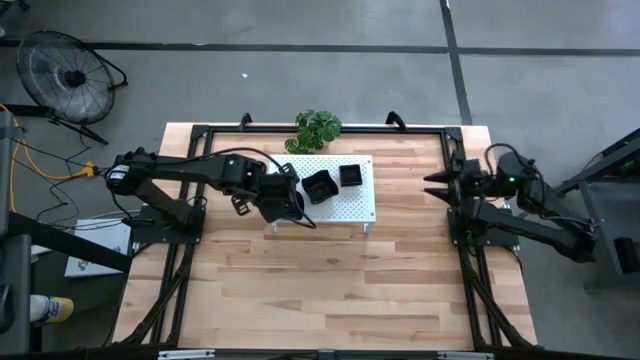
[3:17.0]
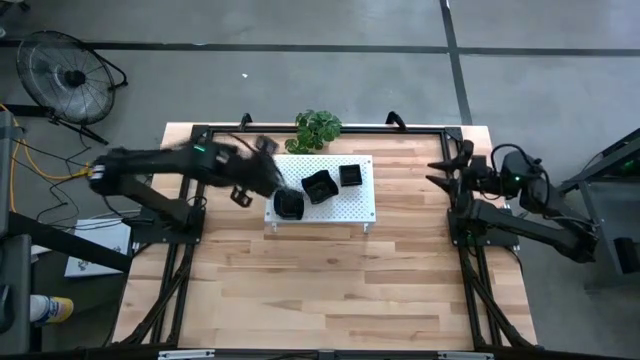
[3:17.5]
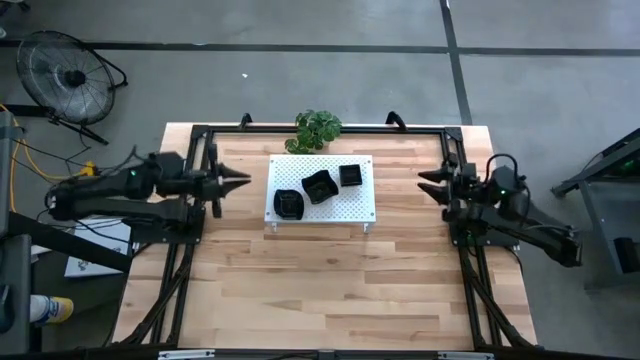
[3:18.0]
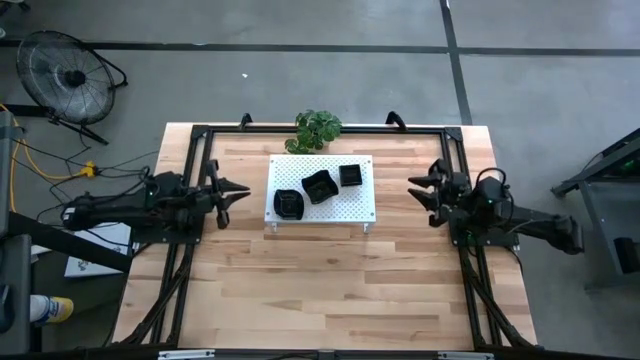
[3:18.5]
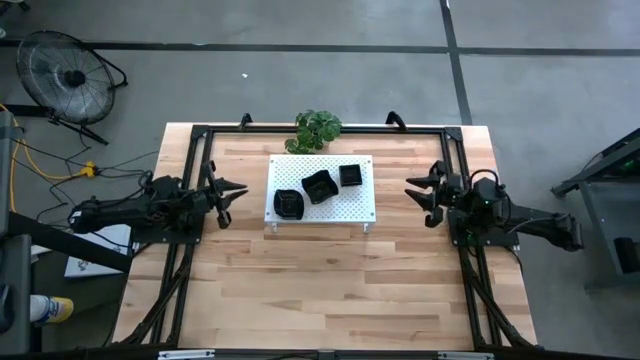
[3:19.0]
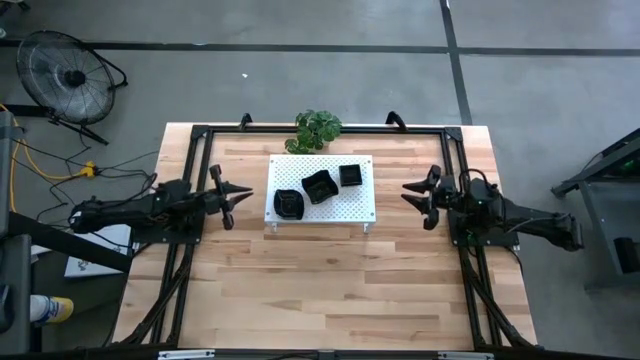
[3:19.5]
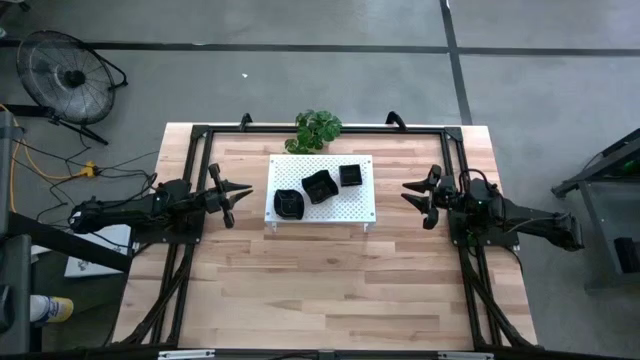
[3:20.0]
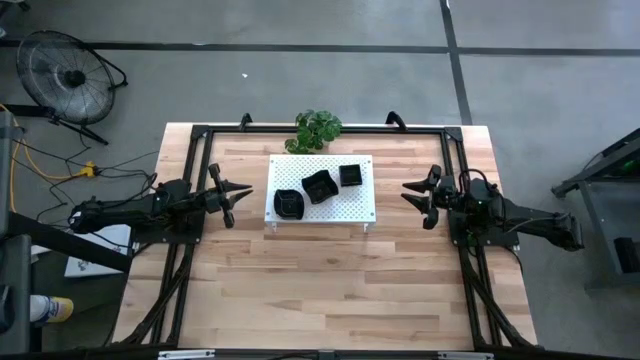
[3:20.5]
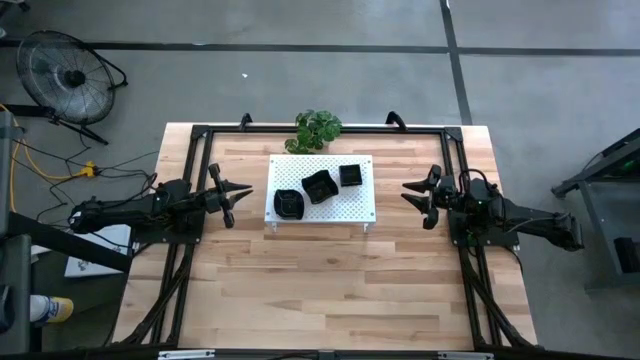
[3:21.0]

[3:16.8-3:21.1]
Task: Pick & Place Mini shaped plates
Return to Home Position

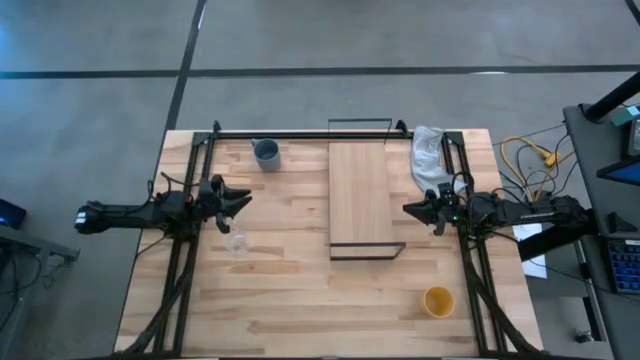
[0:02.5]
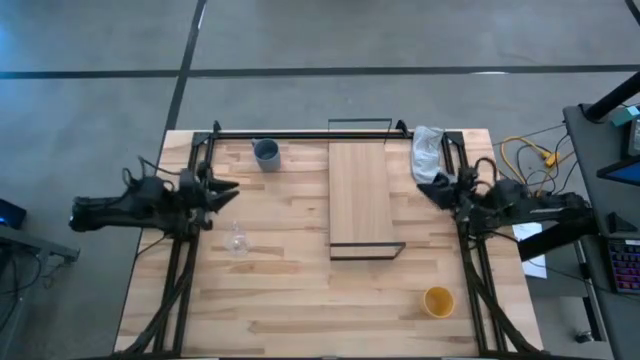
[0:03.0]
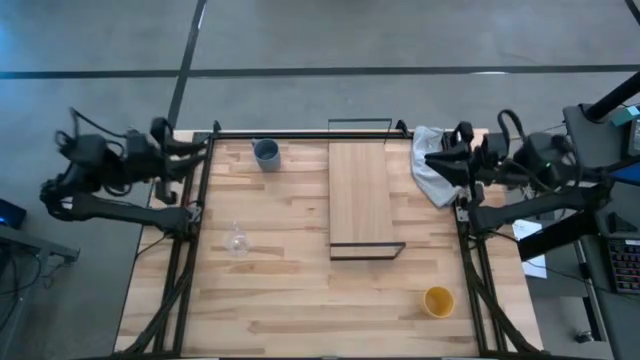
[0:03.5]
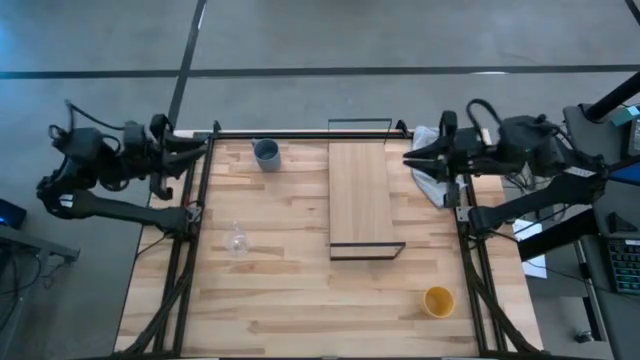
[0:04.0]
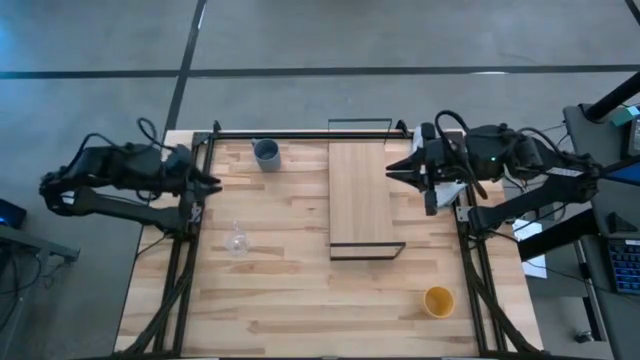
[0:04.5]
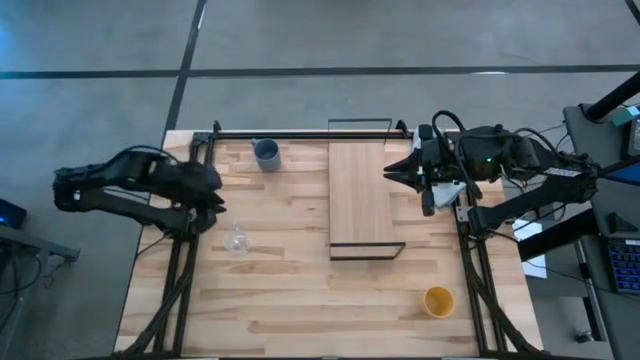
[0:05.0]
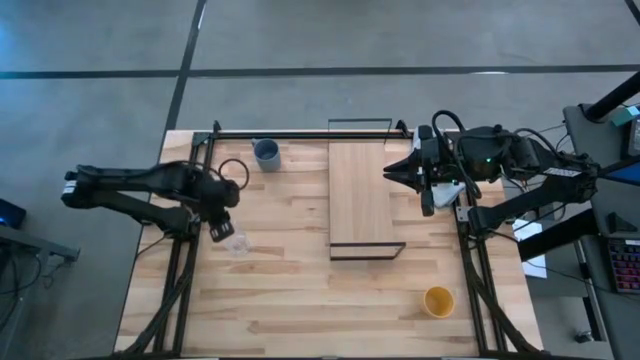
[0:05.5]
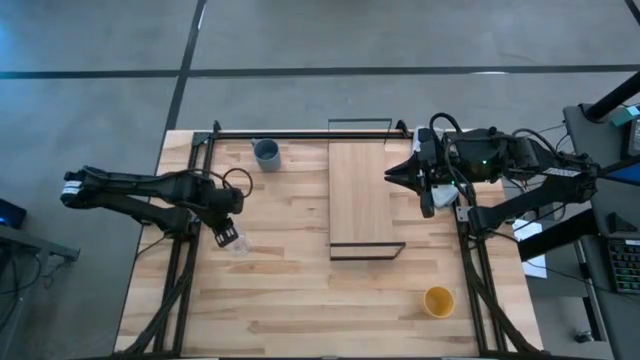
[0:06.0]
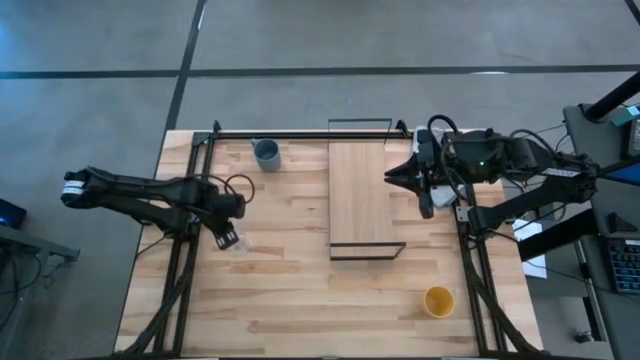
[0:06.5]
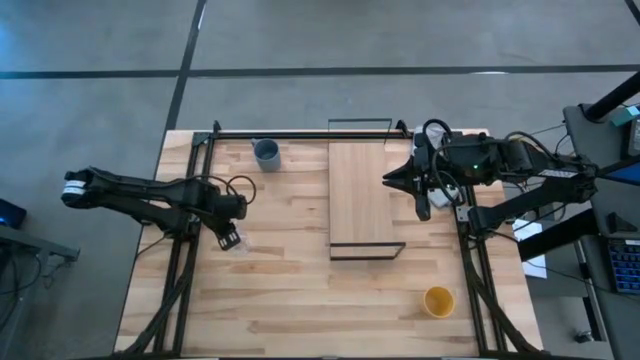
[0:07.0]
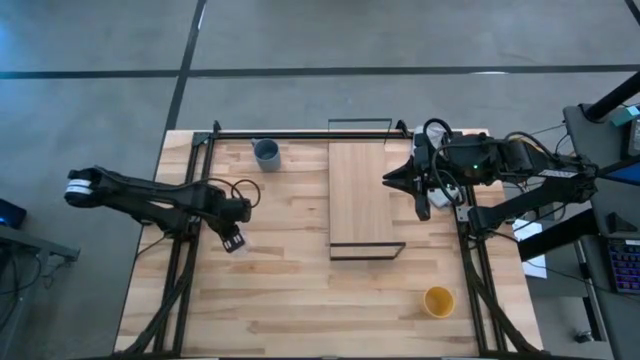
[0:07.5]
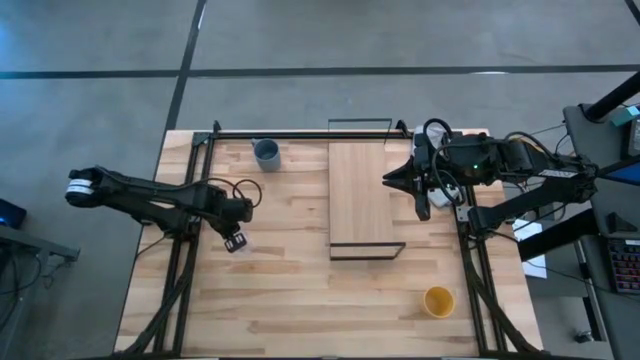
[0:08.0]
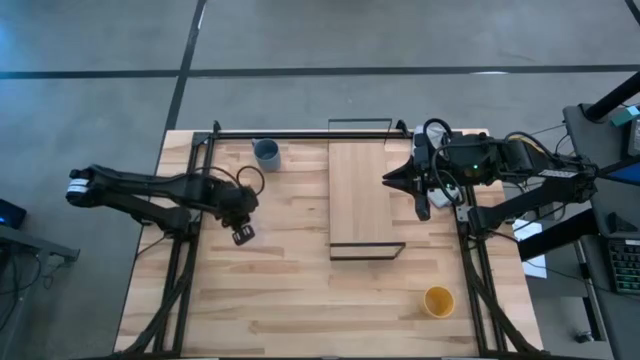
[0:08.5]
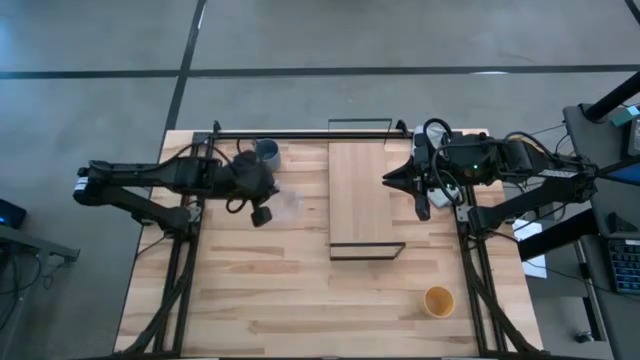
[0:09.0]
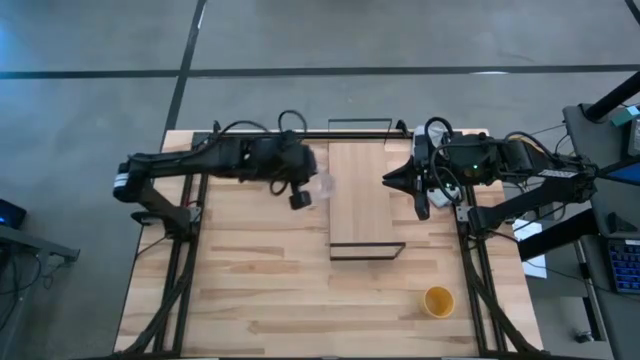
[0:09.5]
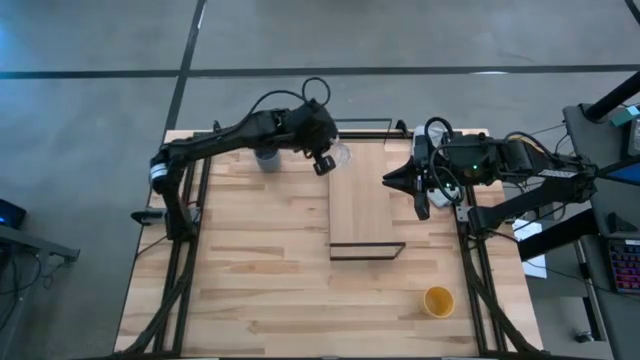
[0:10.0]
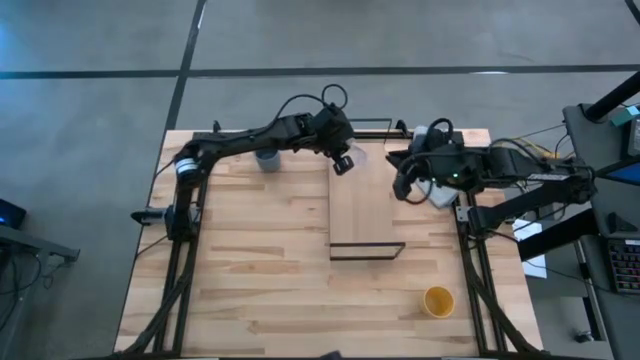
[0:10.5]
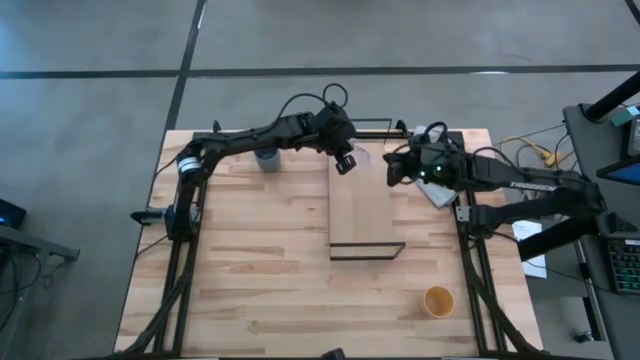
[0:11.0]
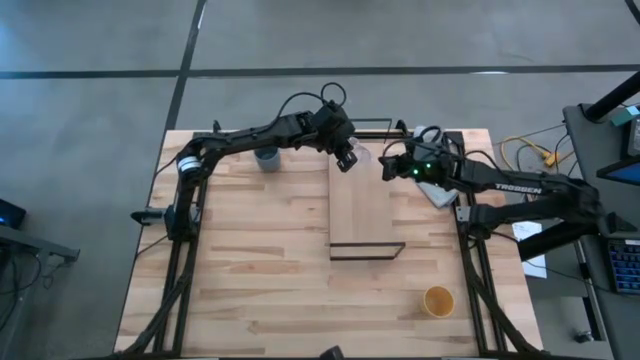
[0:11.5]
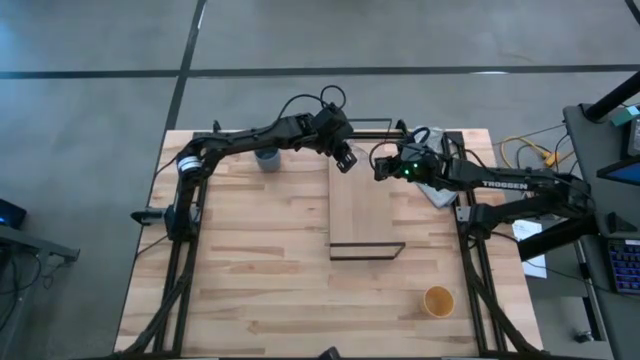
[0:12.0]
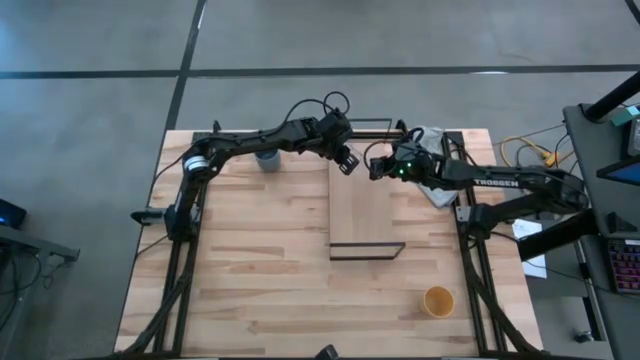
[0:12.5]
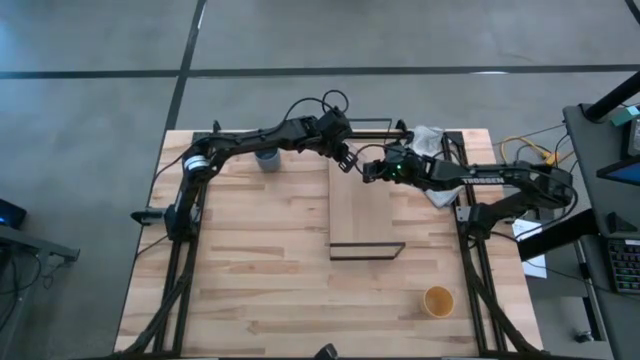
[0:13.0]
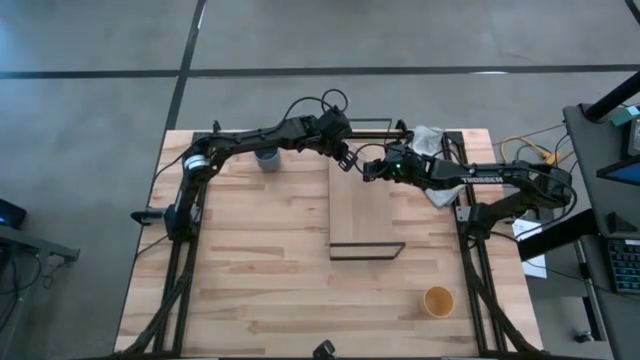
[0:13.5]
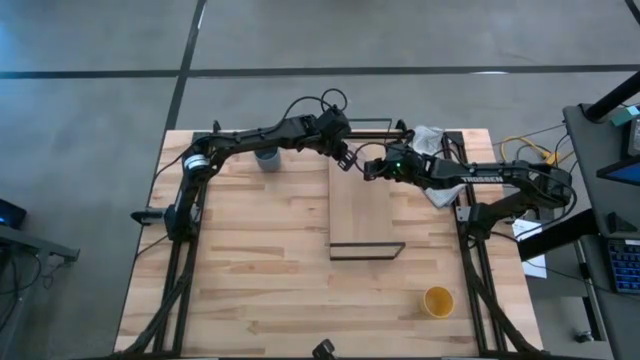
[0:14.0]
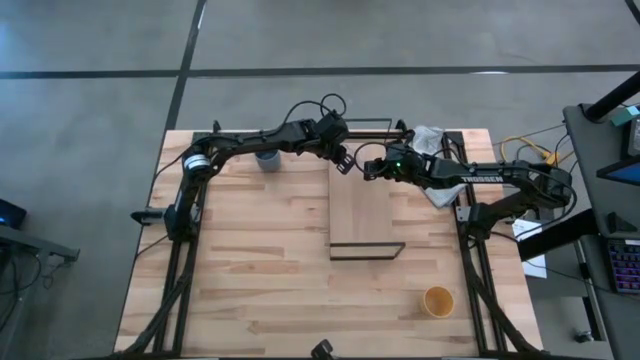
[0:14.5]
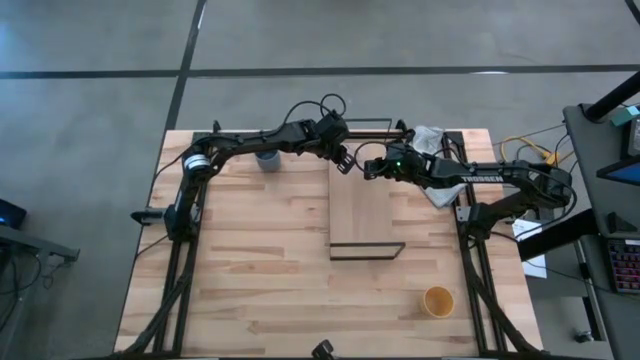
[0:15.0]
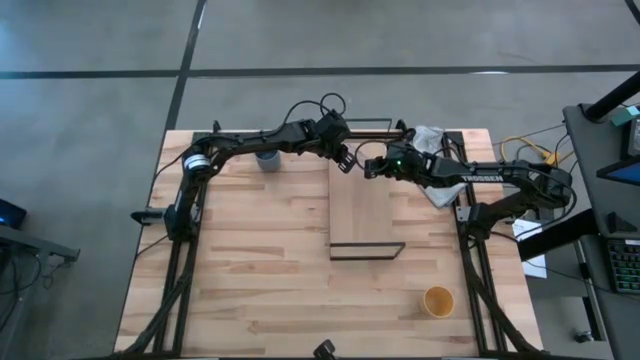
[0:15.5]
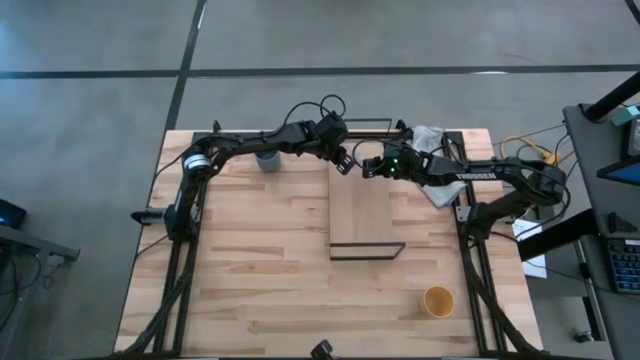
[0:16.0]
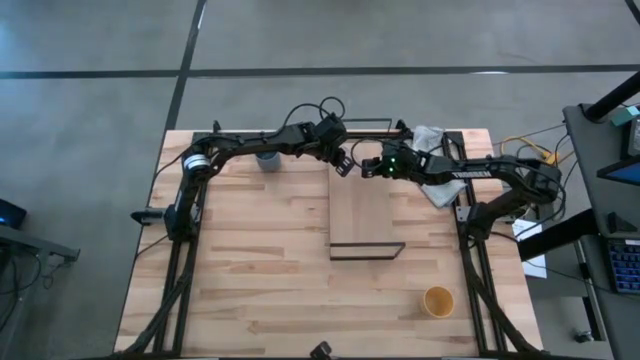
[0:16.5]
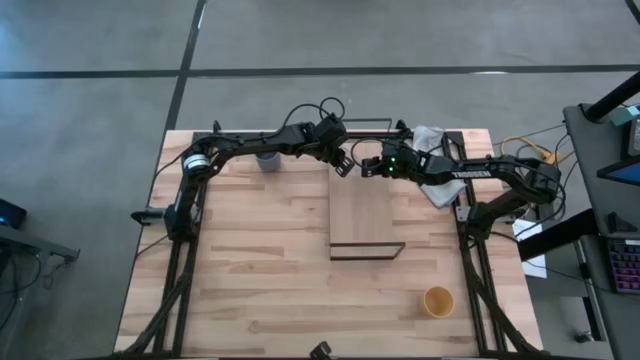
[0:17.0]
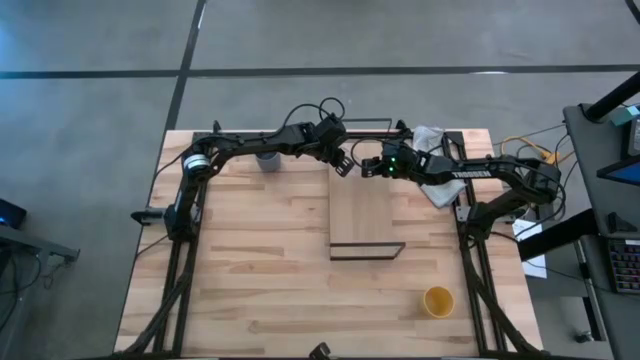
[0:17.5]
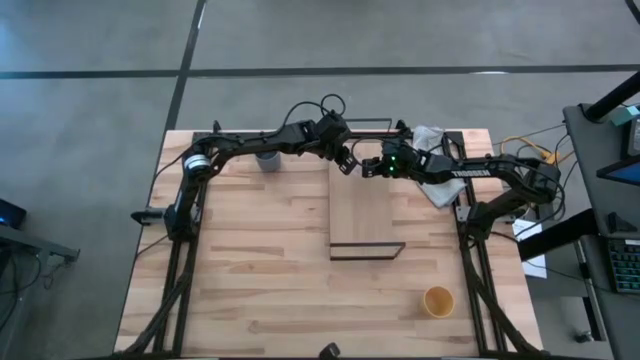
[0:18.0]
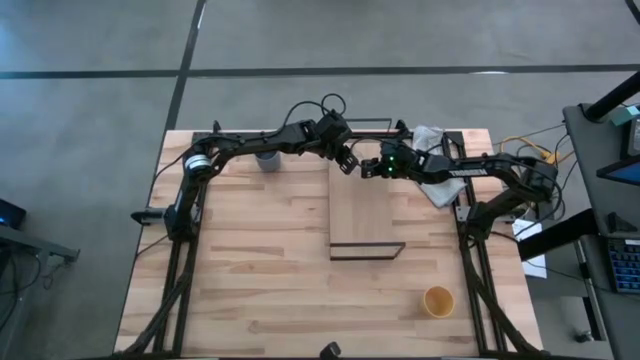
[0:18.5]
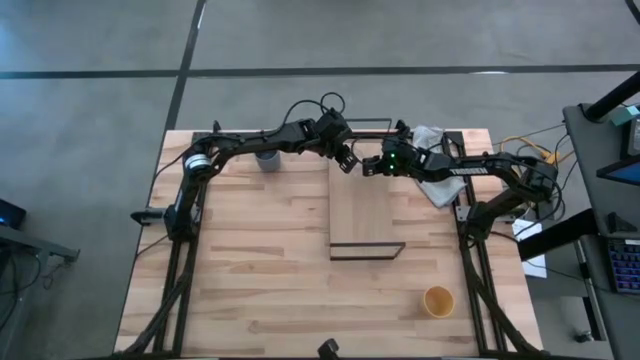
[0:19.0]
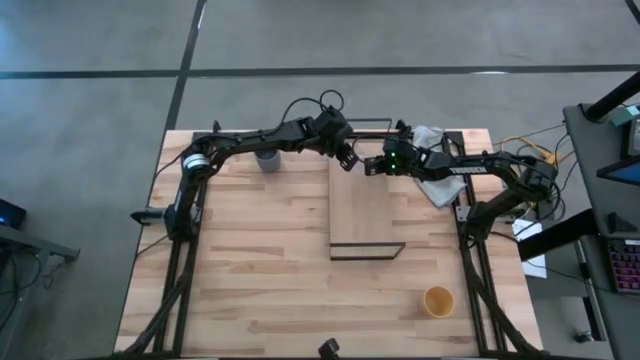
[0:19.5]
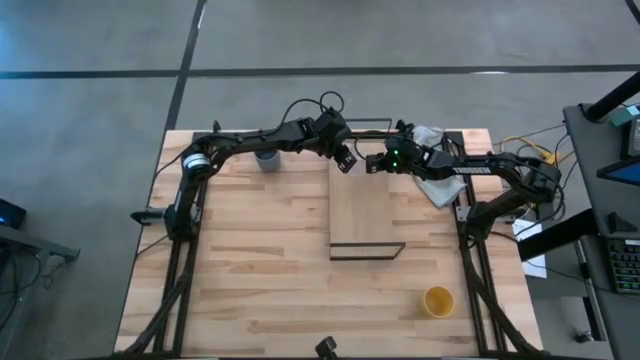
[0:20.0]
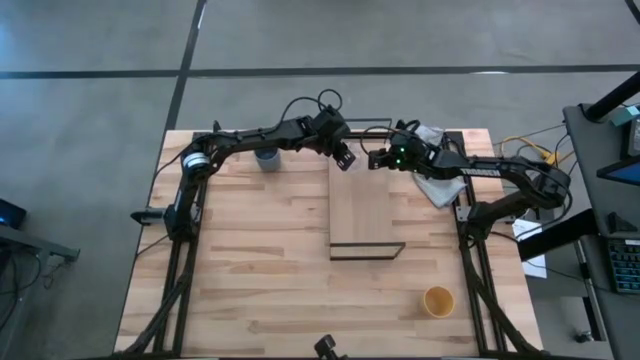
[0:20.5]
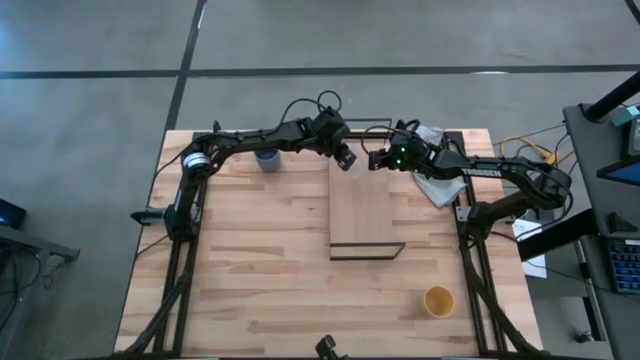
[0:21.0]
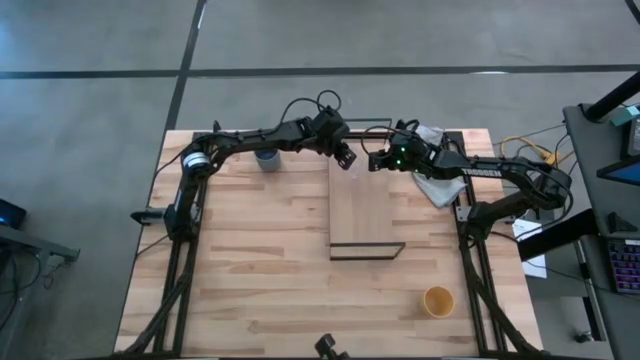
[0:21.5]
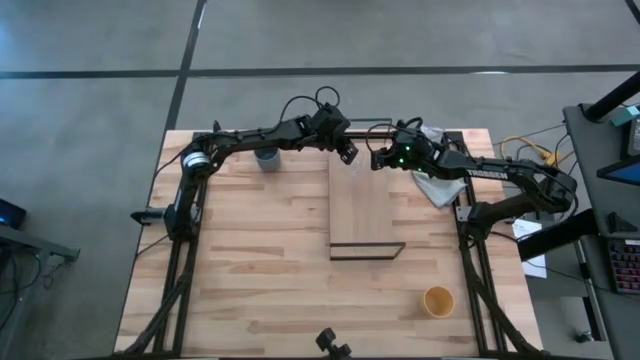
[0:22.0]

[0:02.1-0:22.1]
Task: Stack small to large cups/mugs on shelf
Put the transparent mug on the shelf
